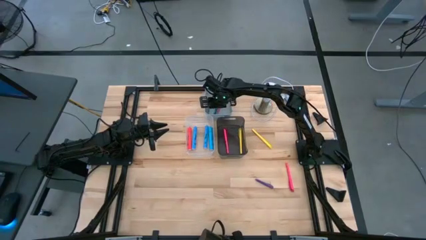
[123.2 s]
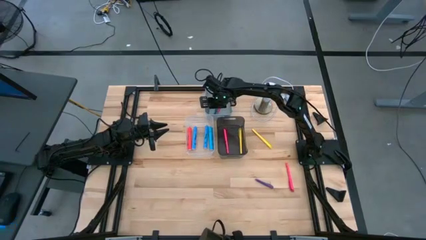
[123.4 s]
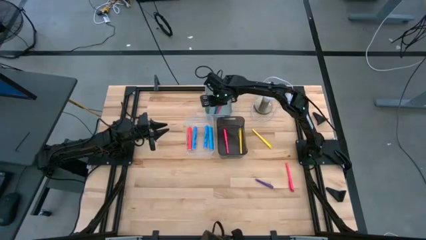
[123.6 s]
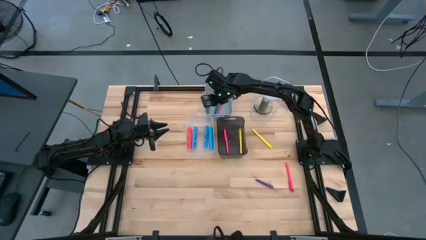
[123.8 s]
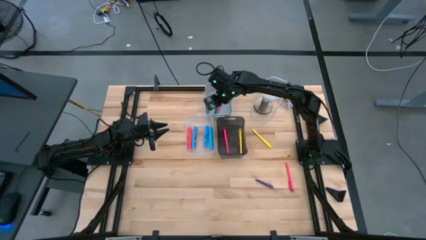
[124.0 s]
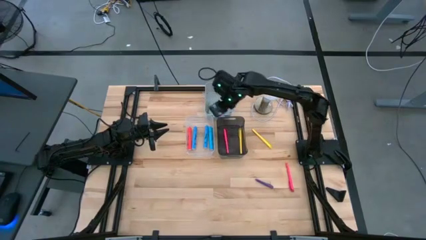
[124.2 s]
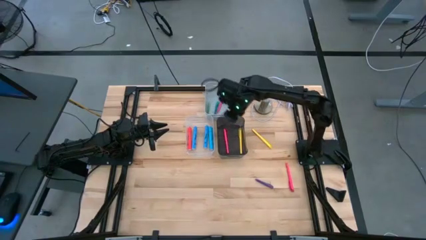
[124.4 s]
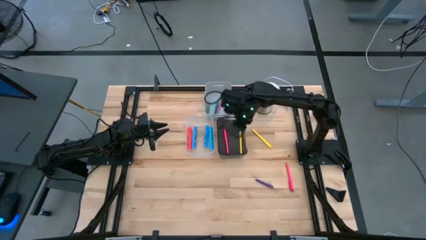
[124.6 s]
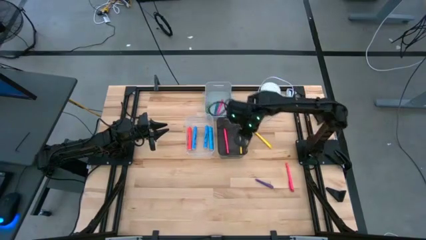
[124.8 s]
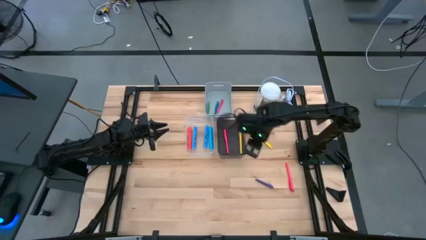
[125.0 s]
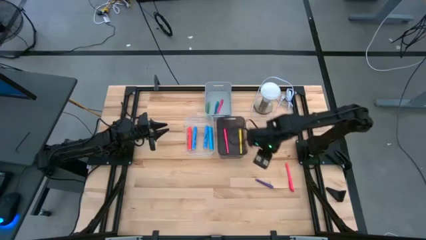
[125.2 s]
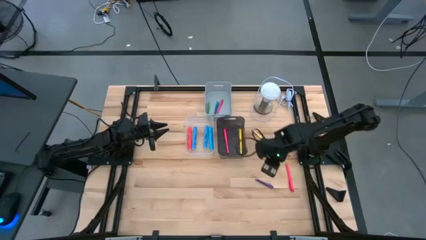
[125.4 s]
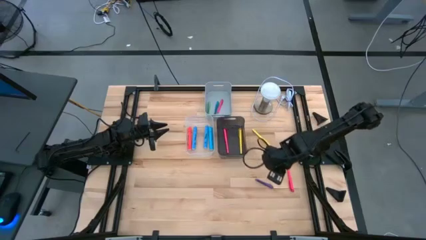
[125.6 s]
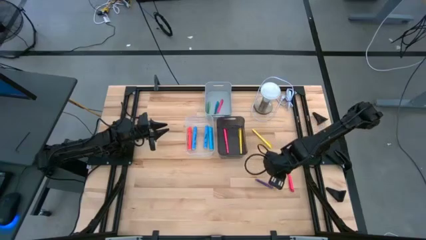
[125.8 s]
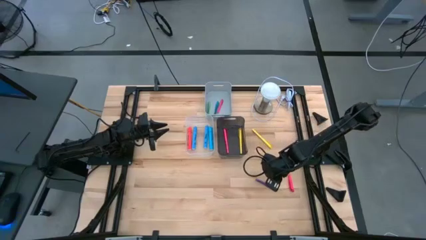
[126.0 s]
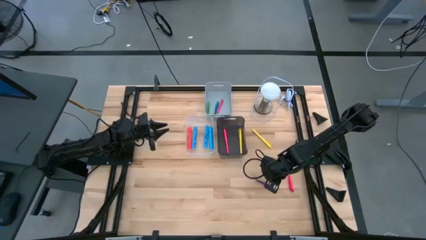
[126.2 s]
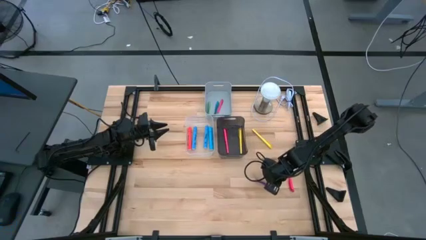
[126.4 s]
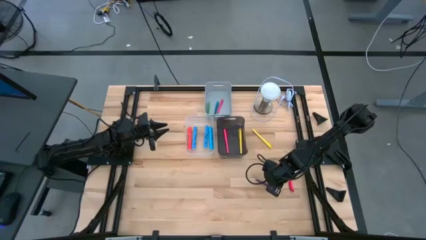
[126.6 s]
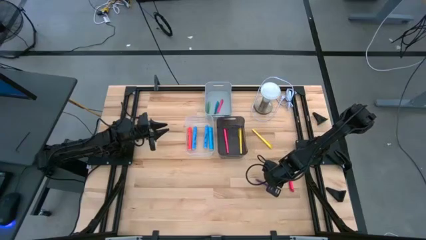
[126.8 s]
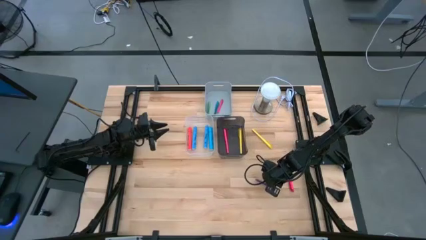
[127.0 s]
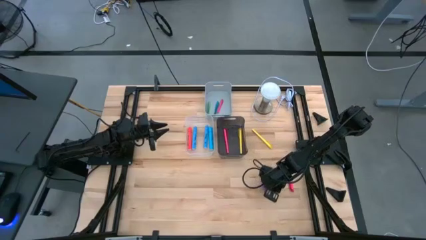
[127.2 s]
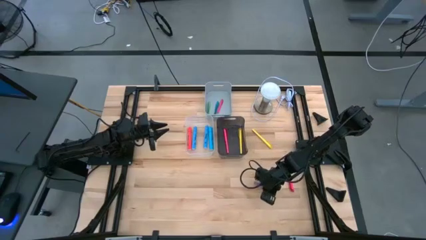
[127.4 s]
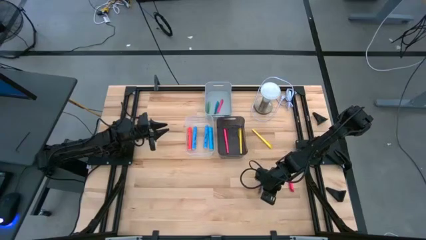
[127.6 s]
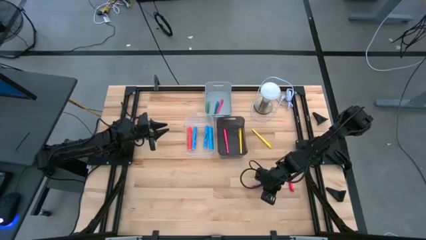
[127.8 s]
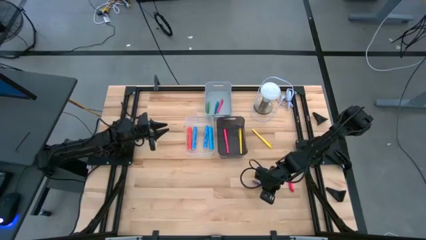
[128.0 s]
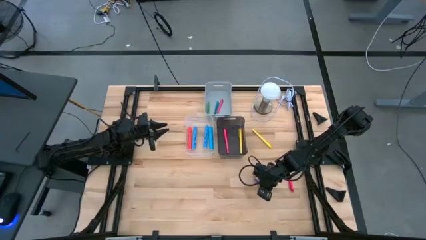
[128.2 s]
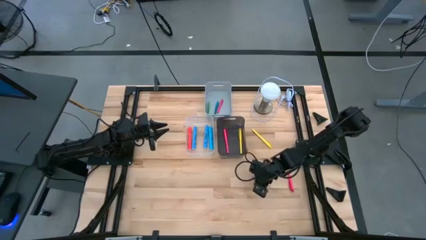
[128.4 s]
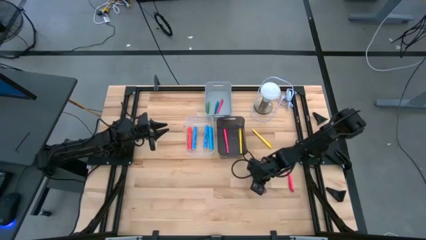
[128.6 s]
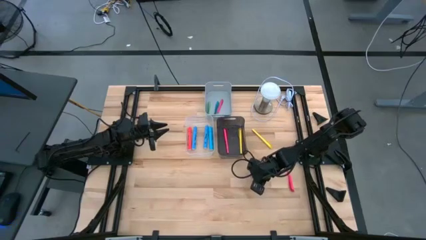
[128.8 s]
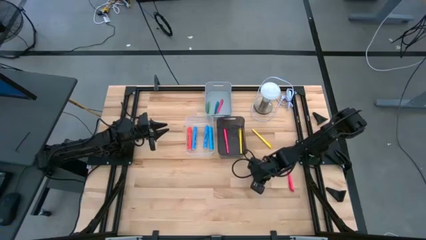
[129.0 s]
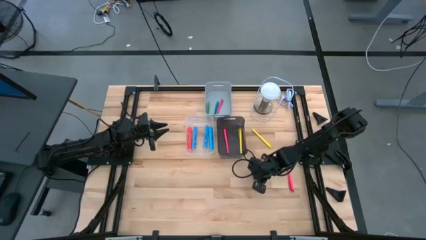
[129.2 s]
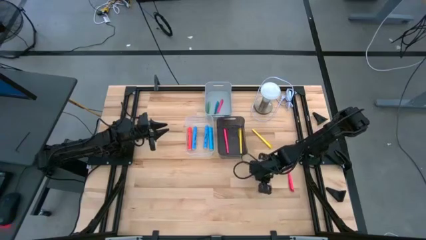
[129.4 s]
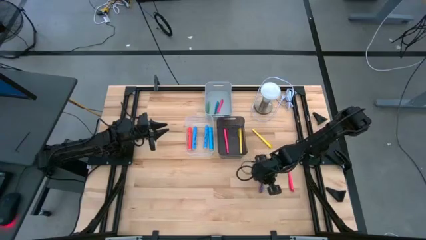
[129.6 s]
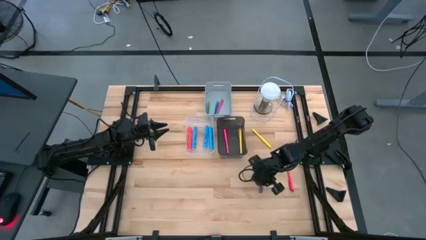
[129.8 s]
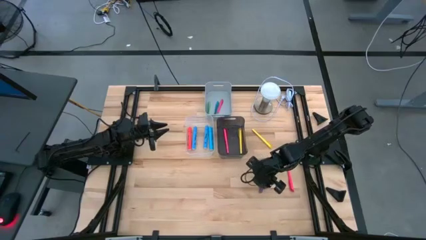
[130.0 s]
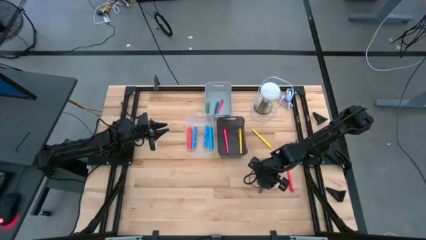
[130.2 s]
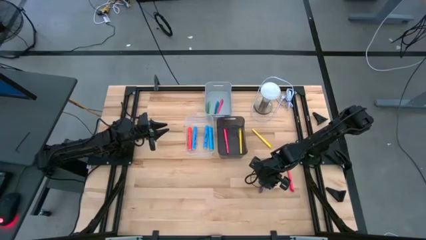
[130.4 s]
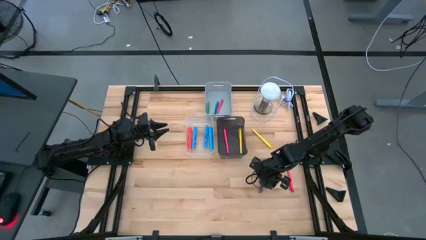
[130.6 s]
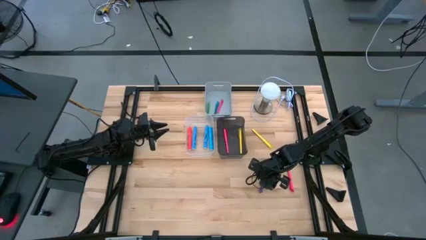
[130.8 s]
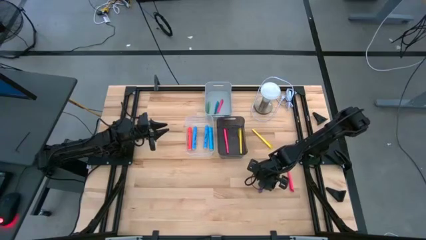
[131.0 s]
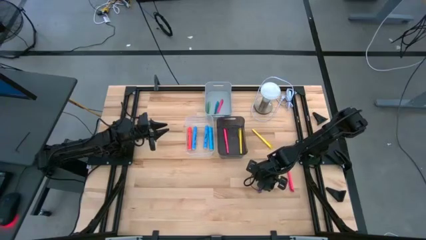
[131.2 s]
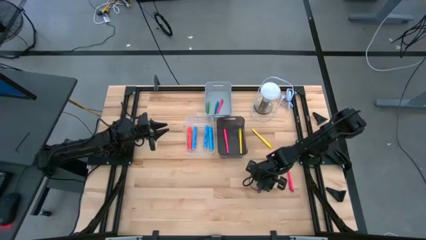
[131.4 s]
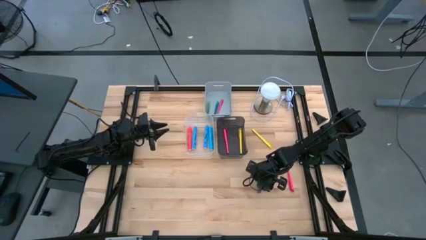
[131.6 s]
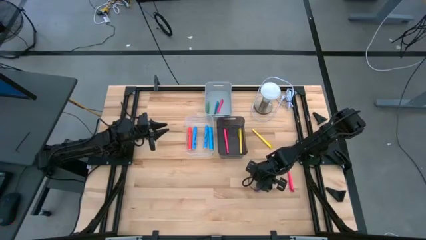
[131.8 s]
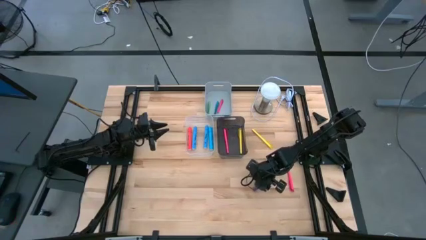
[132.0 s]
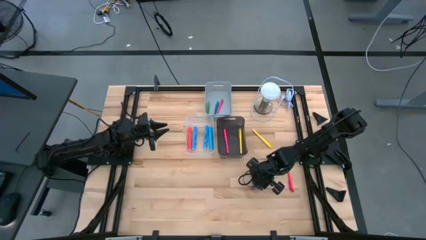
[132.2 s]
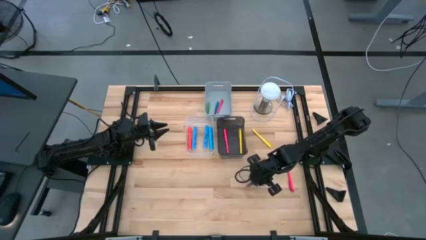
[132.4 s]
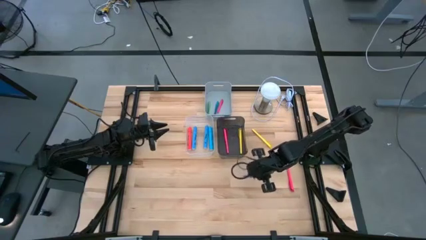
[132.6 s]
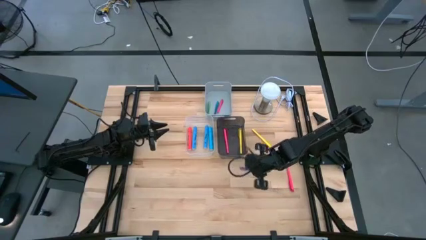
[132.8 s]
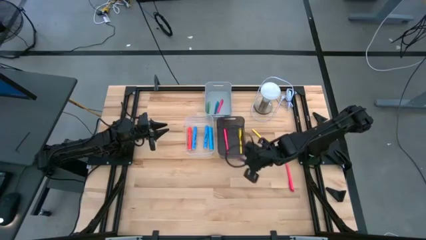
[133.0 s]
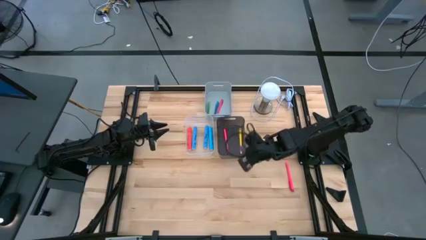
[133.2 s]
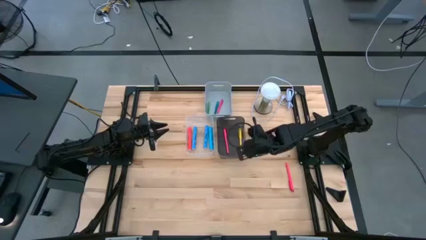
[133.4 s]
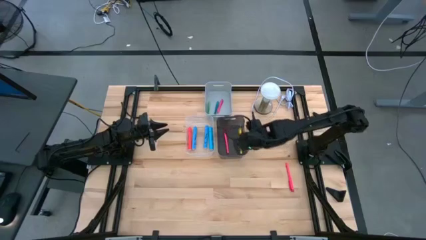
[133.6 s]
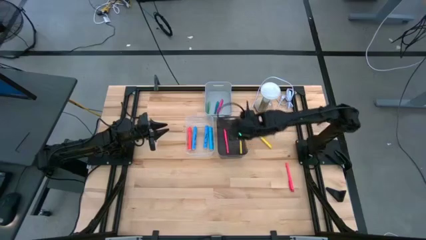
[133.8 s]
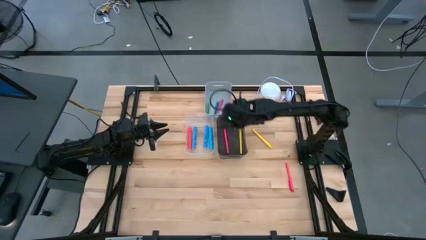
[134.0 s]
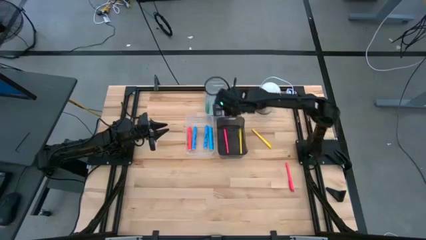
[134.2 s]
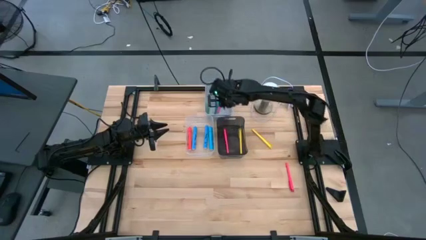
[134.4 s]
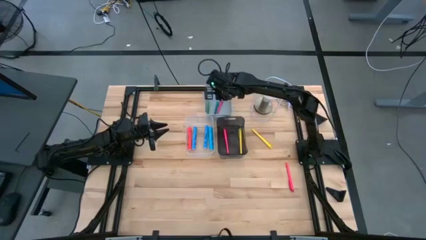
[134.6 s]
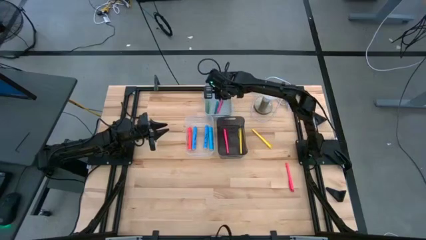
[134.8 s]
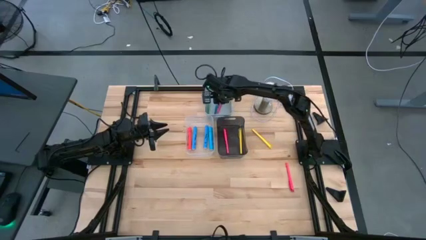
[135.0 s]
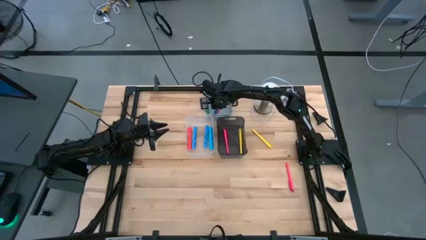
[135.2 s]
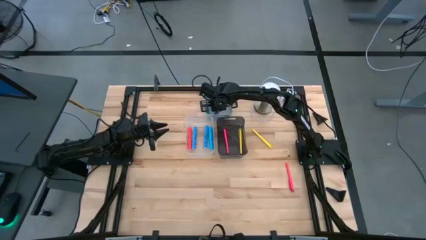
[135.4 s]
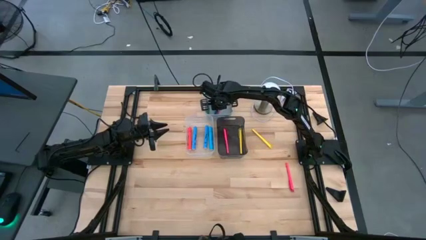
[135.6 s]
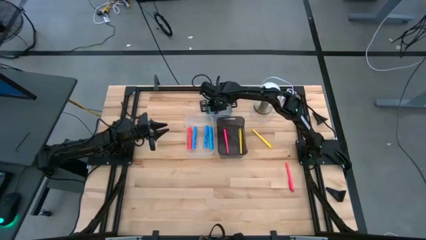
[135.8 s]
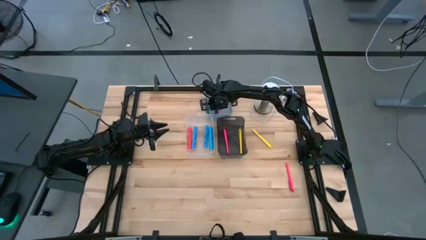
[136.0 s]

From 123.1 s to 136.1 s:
Task: Pick & Place Markers
Put the purple pen into the gray bin
